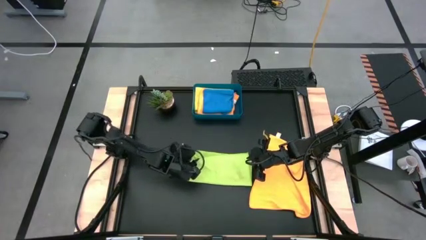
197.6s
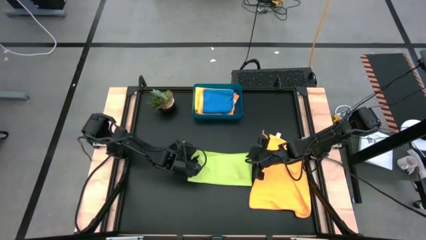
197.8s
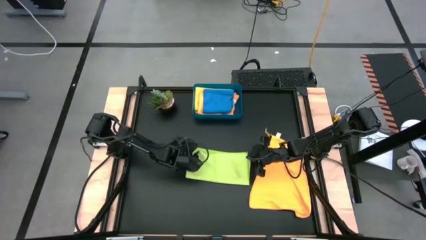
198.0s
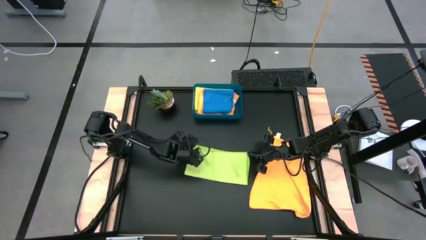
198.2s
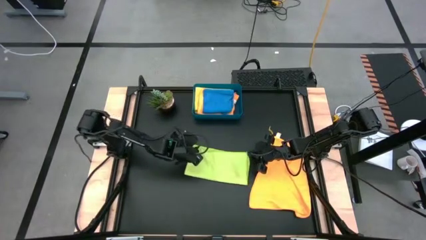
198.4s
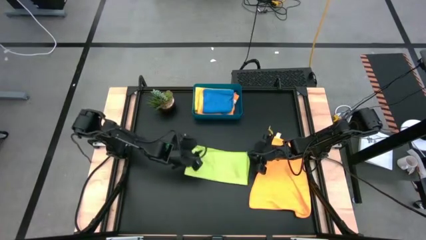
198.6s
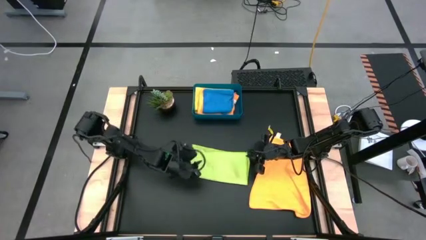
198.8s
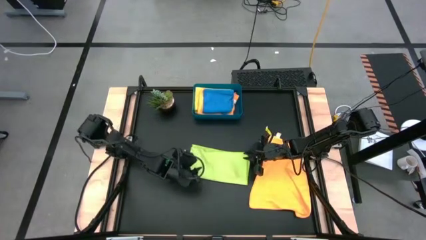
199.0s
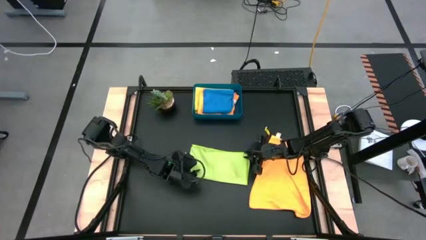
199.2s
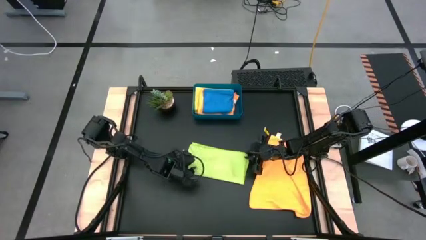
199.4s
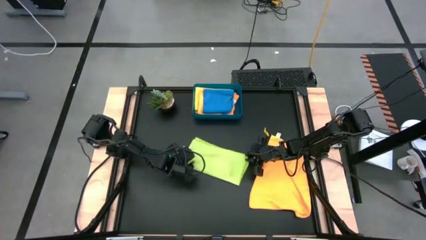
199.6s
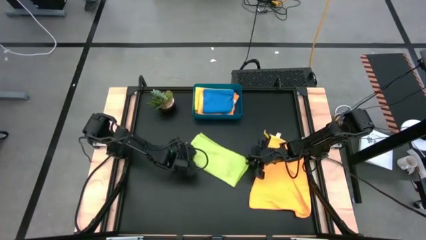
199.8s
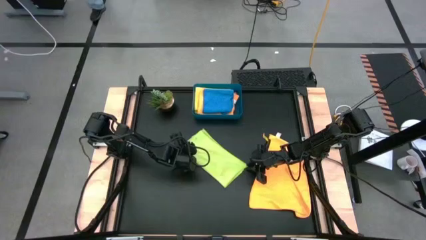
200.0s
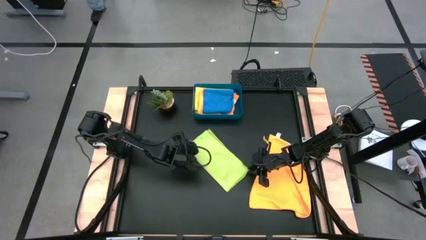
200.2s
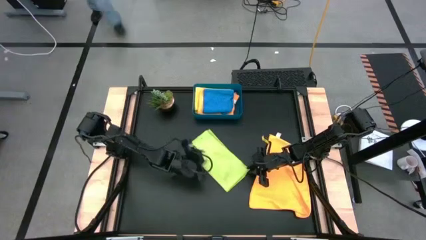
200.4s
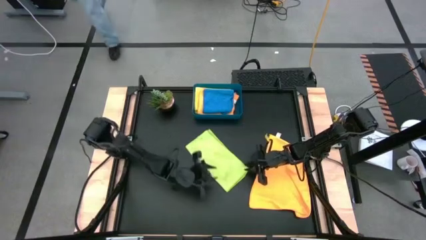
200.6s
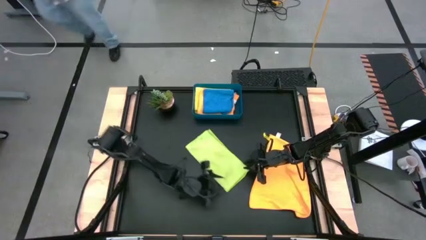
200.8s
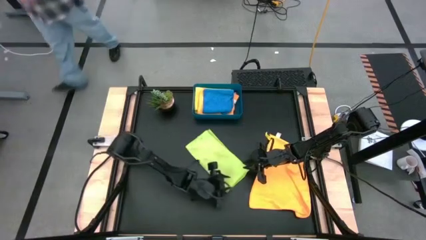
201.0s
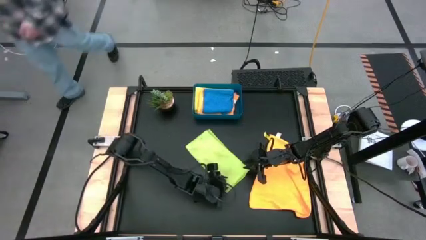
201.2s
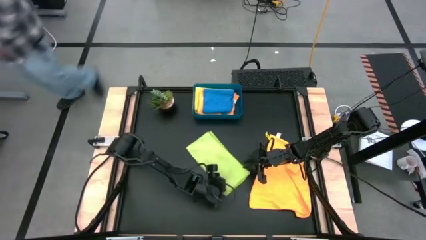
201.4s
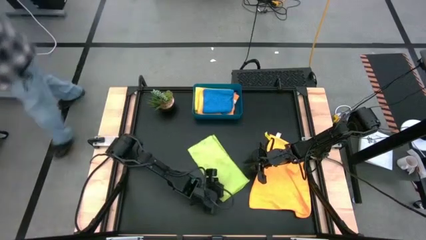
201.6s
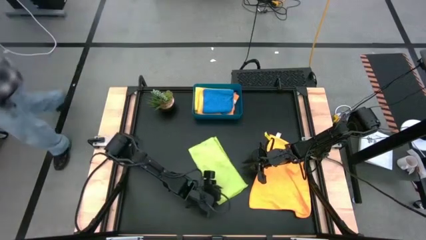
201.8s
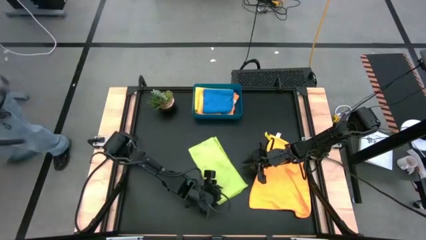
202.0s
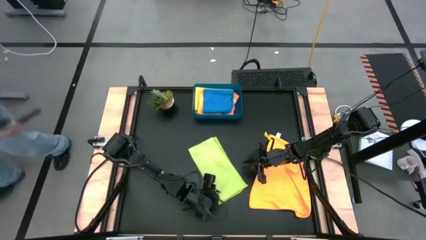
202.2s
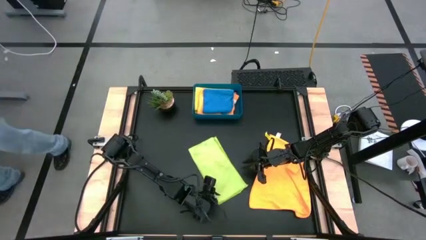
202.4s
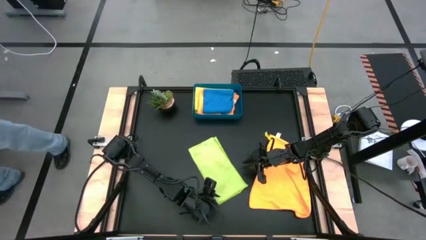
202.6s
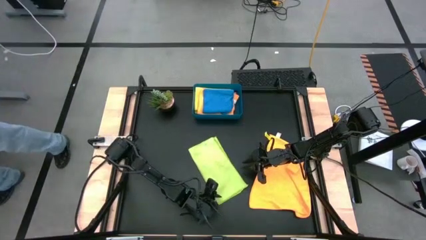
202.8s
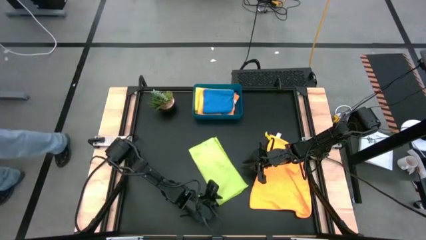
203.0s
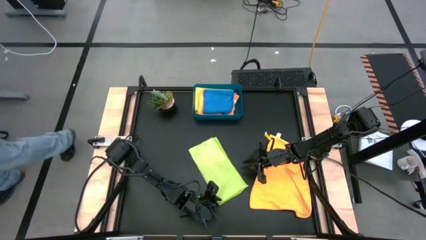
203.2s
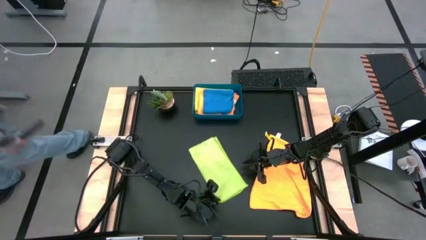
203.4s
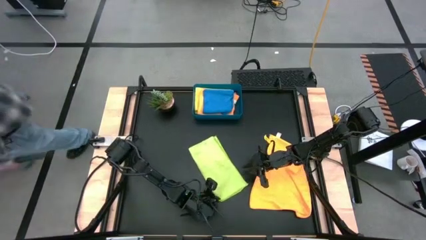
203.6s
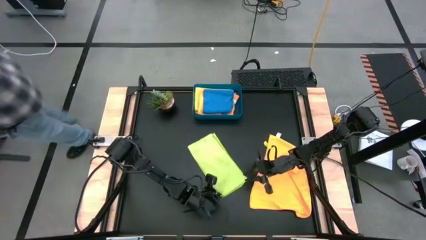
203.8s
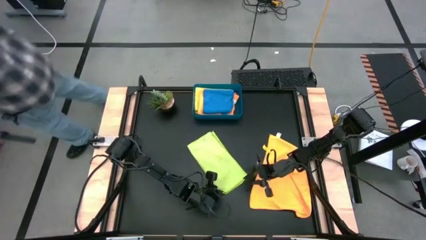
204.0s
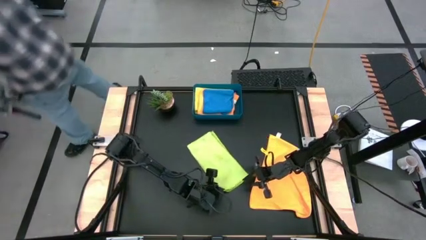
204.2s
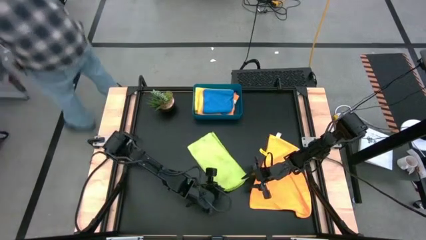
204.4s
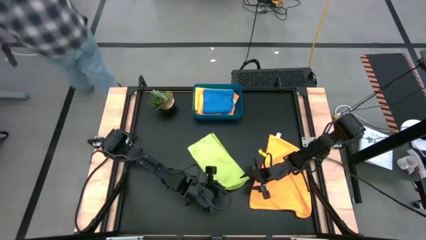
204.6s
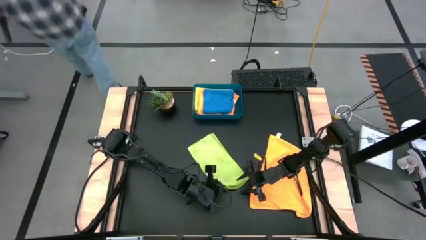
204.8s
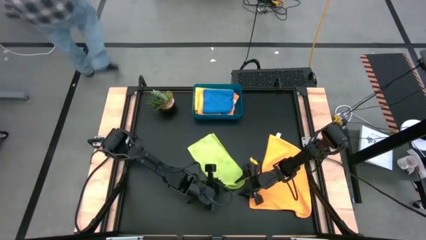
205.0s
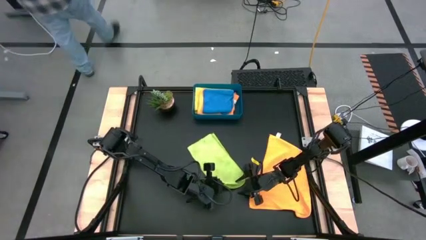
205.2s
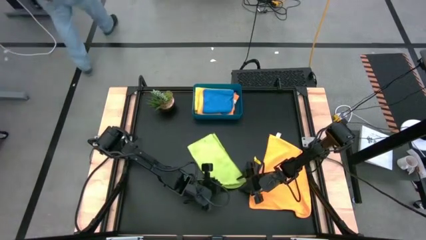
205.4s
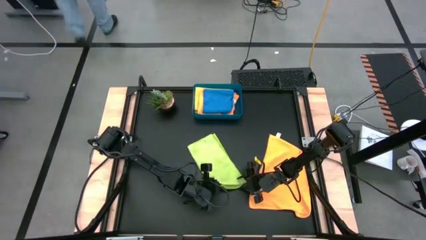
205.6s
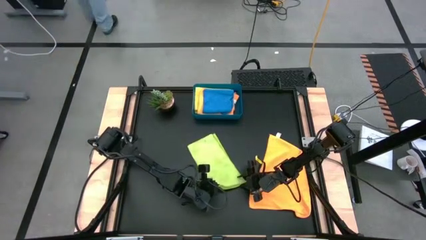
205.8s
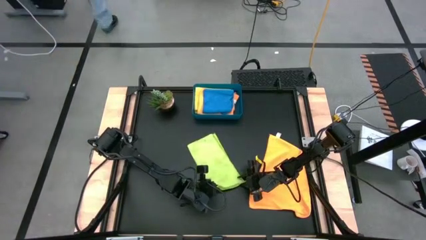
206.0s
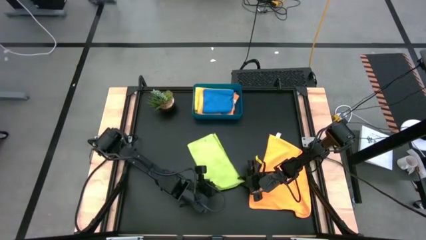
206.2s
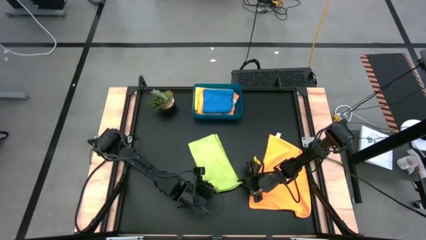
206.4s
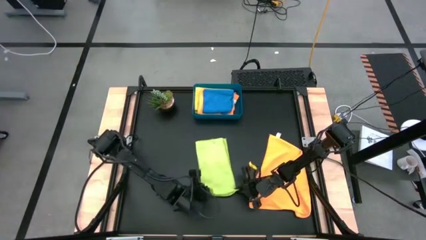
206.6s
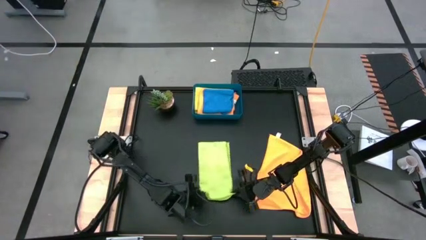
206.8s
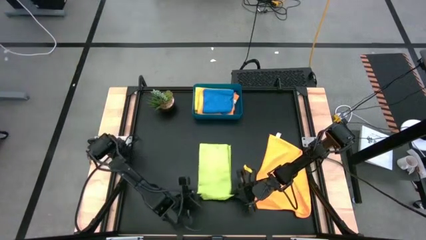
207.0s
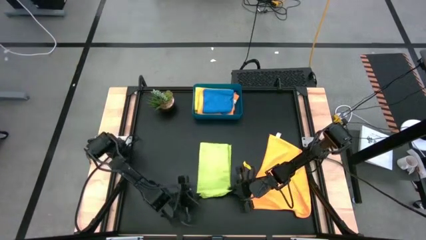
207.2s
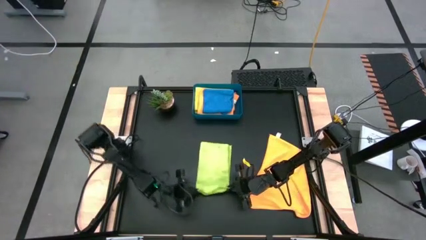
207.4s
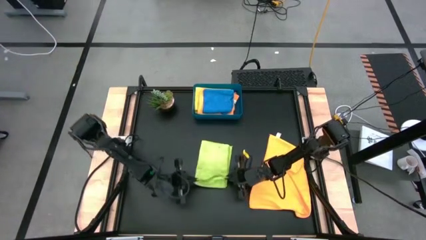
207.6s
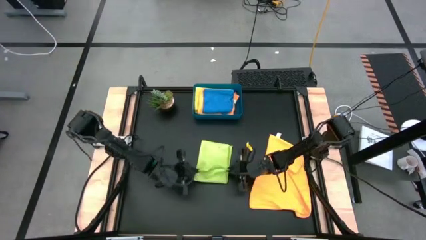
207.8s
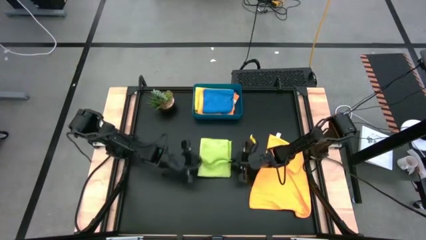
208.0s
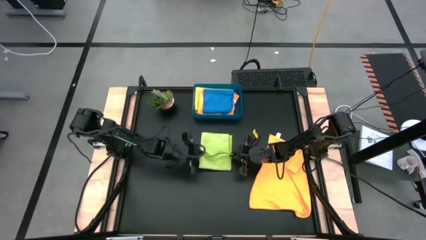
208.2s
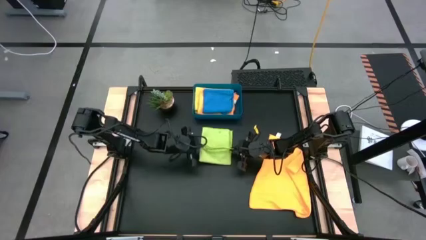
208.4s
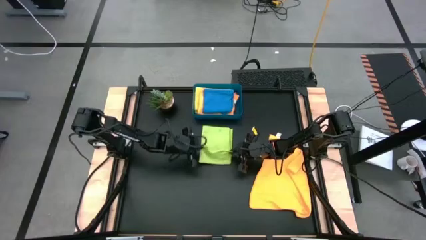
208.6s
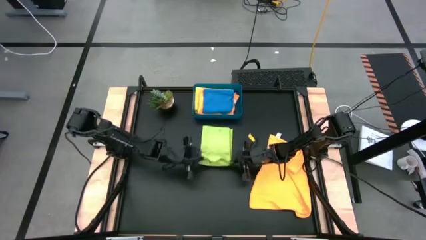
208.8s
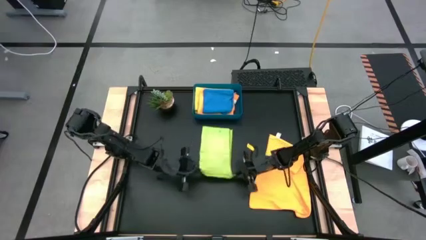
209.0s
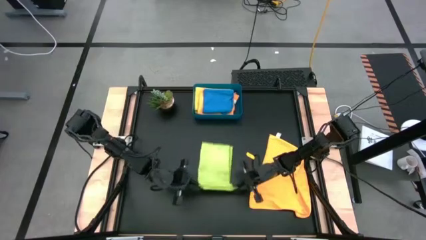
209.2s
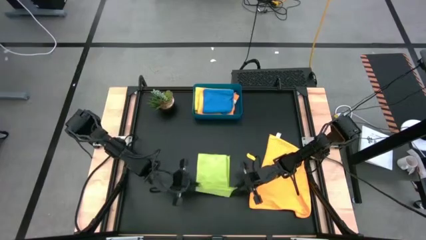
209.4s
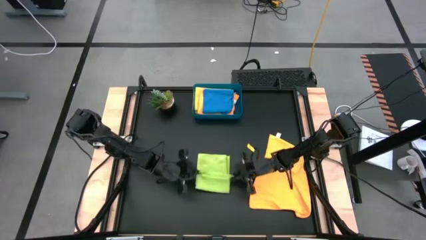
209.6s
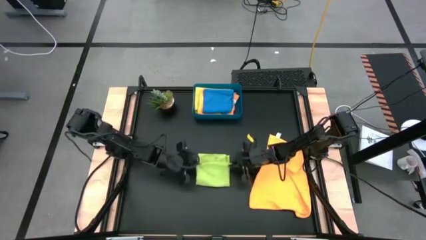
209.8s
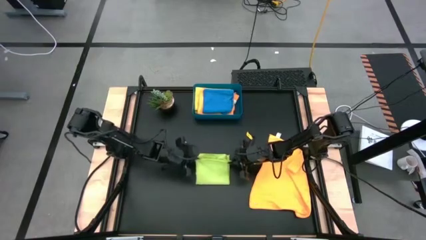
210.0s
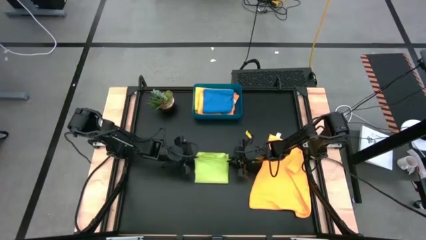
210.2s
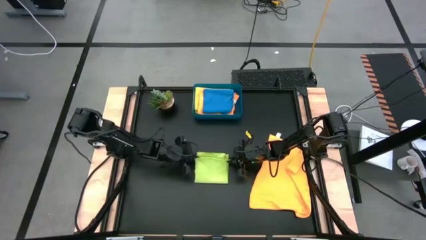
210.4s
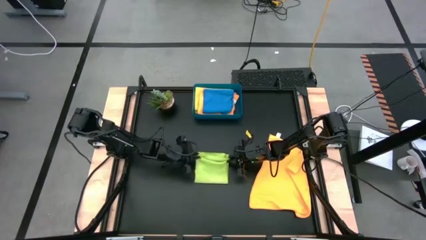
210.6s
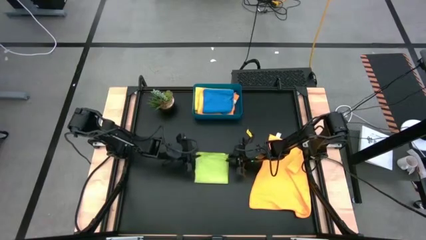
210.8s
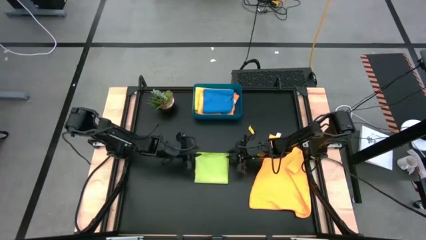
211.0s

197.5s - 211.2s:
Task: Fold microfiber towels
Fold the green microfiber cloth

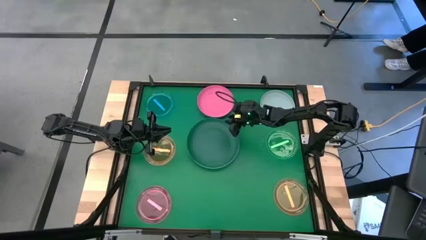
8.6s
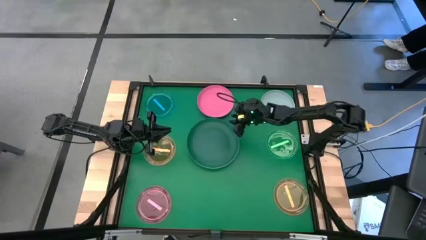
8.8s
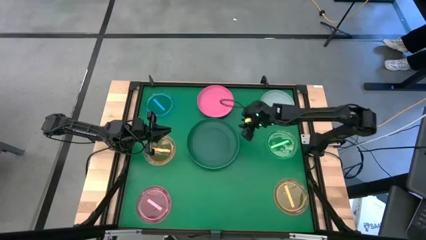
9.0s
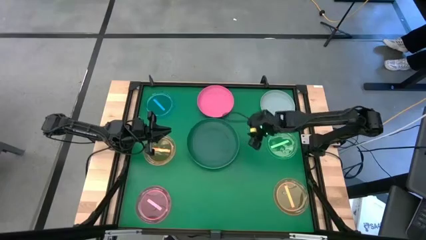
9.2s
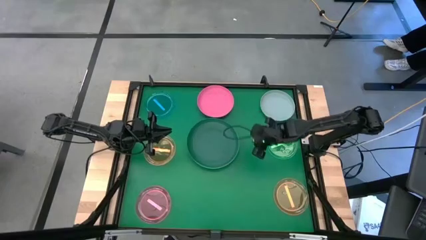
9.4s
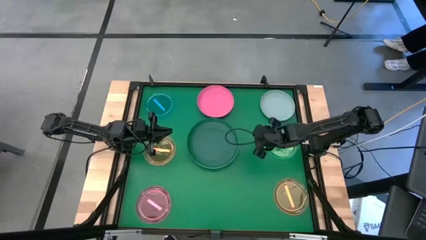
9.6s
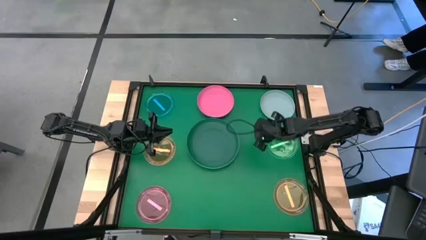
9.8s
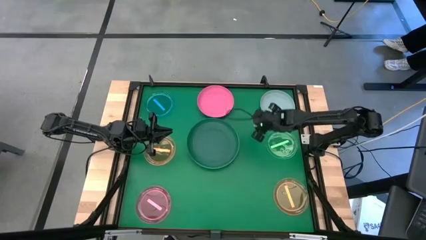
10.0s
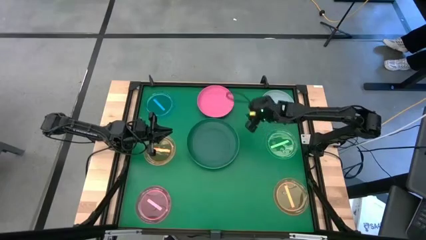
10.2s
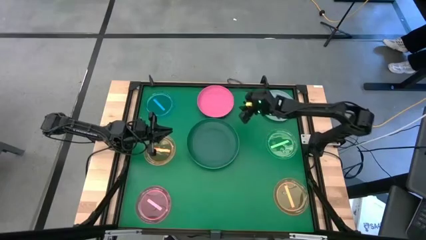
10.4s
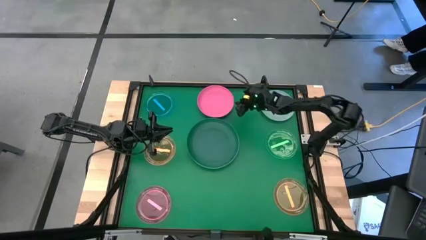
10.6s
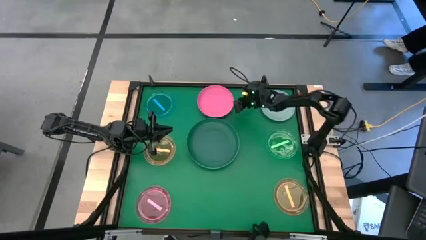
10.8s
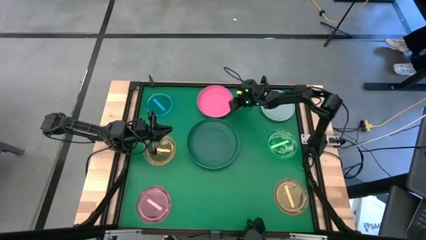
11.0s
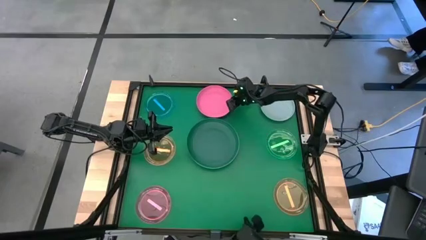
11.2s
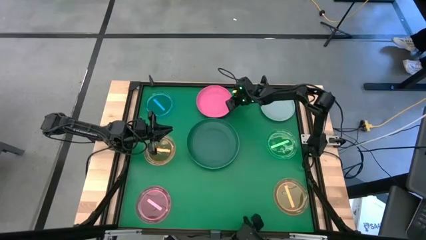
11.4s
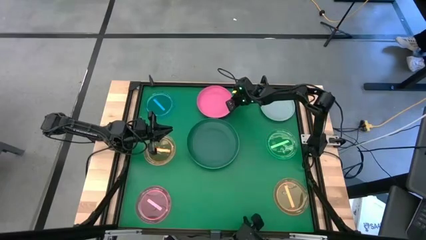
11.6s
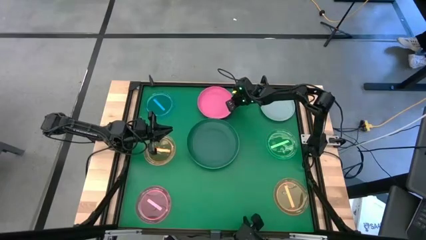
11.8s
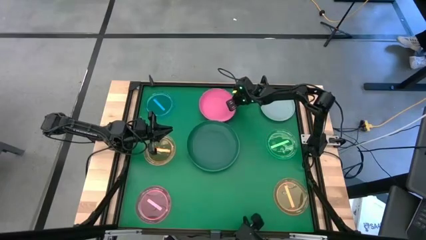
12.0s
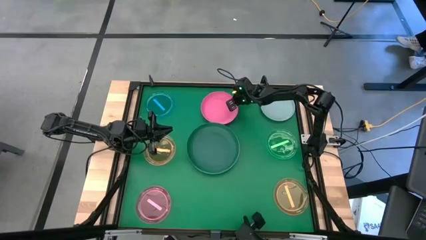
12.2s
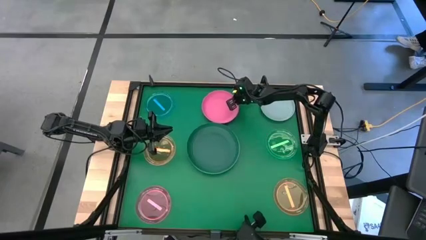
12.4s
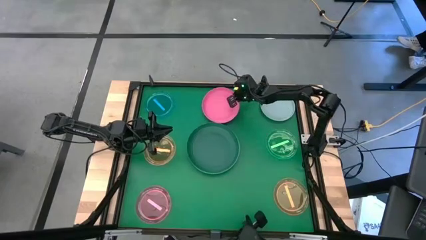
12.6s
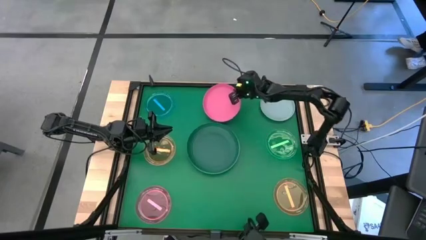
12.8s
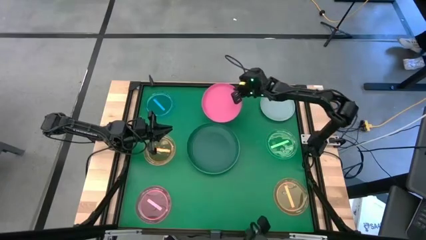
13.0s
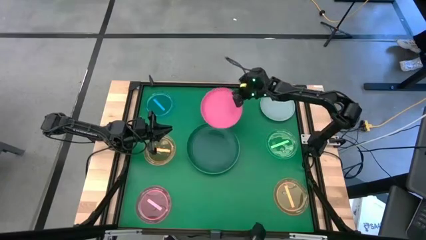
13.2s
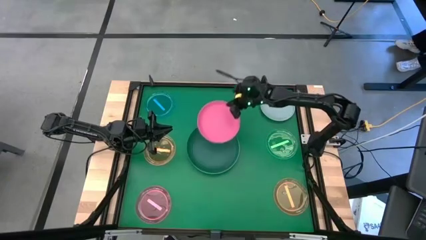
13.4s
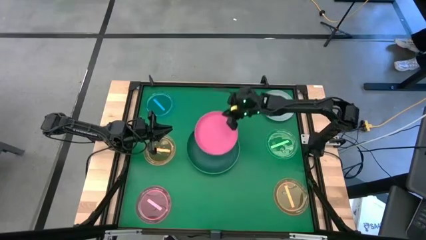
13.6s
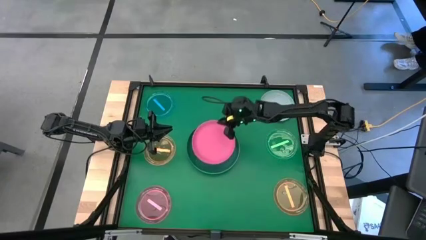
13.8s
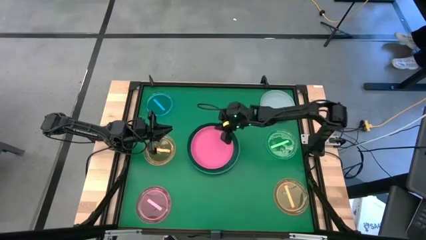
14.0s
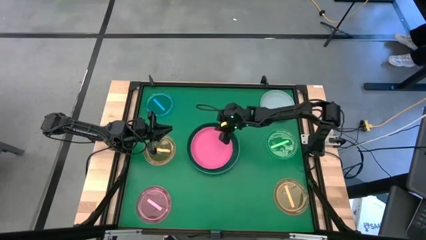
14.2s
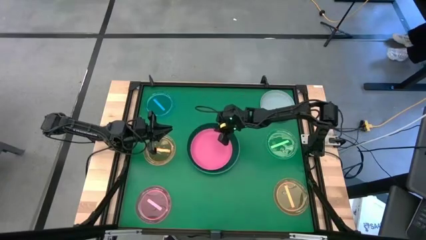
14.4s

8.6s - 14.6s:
Task: Stack plastic plates
Stack the small pink plate on top of the large dark green plate
